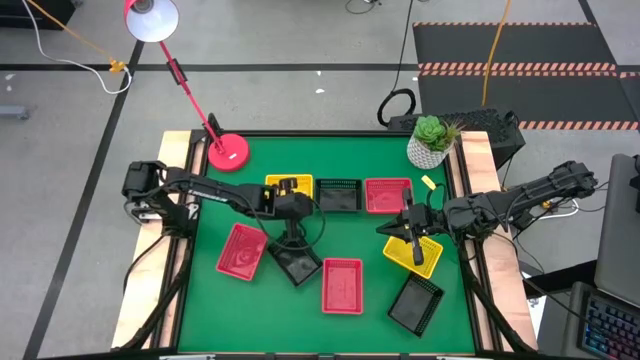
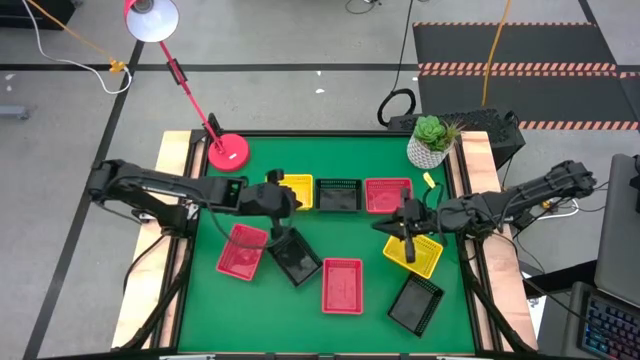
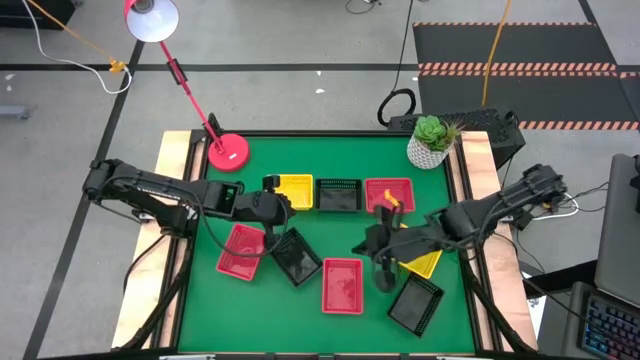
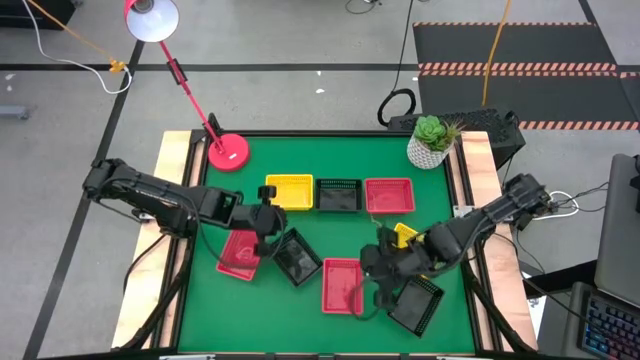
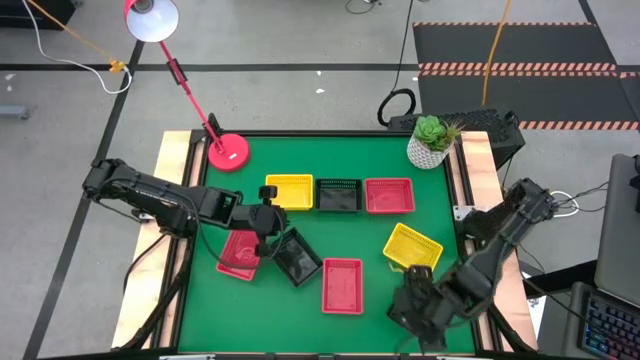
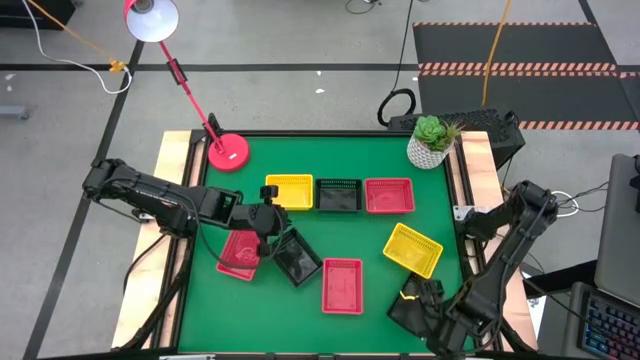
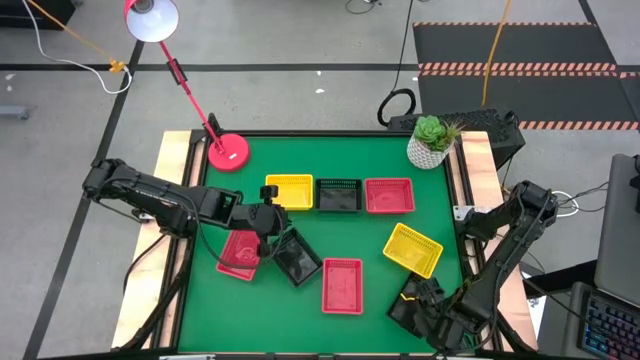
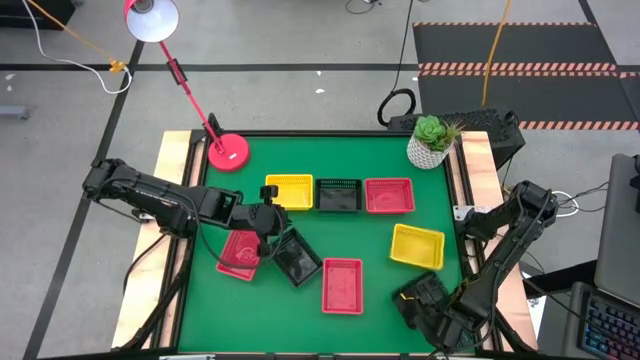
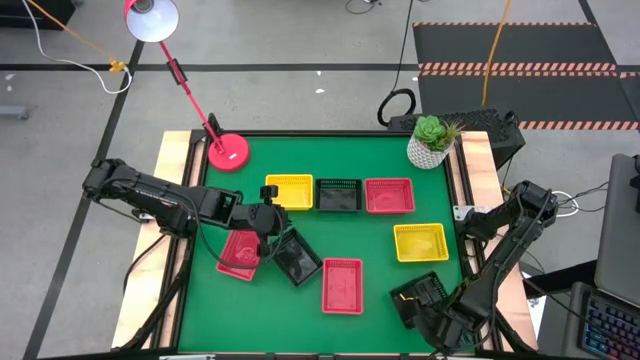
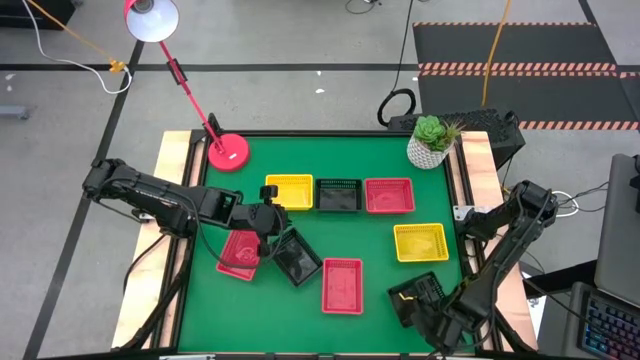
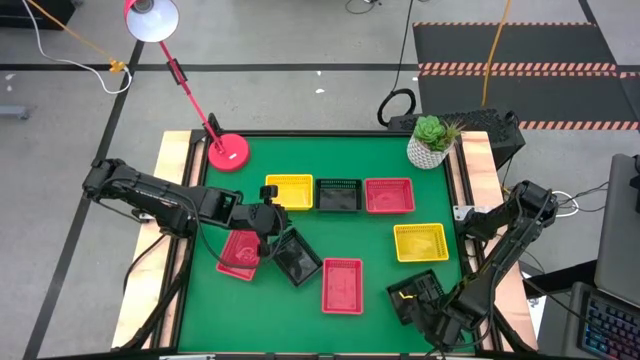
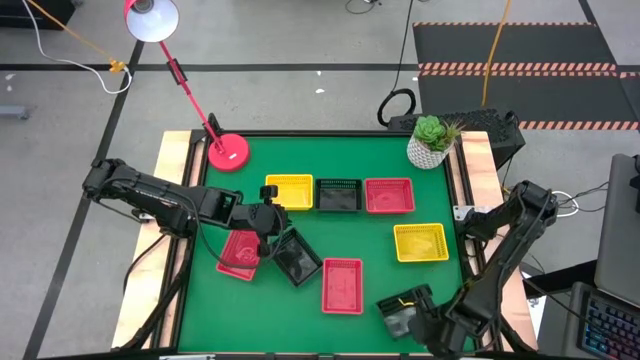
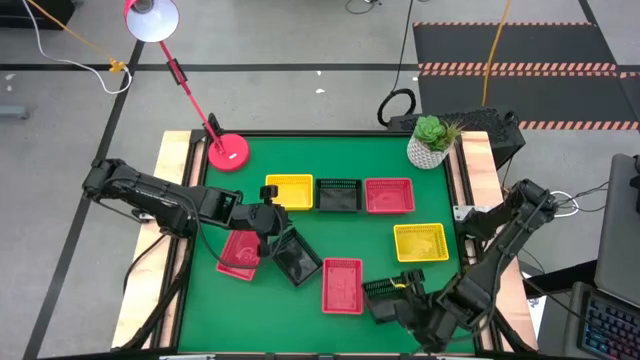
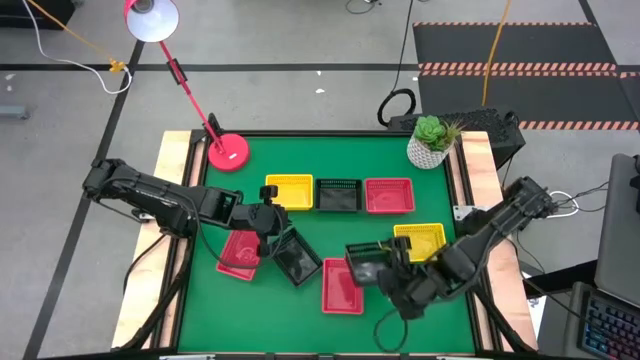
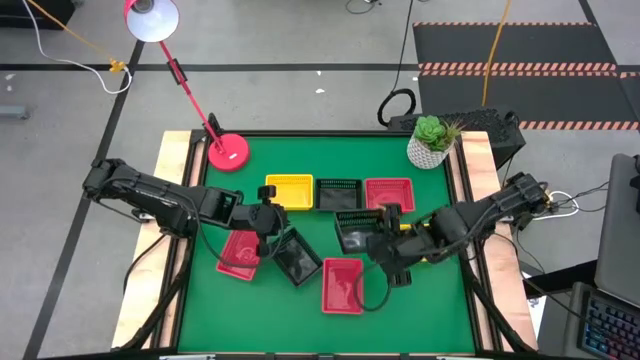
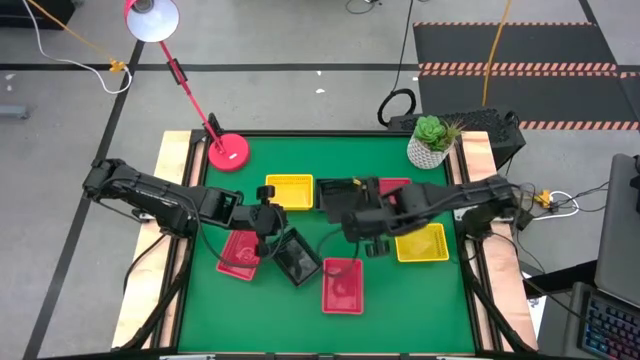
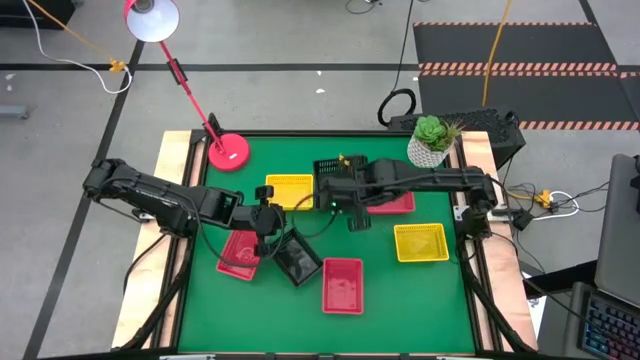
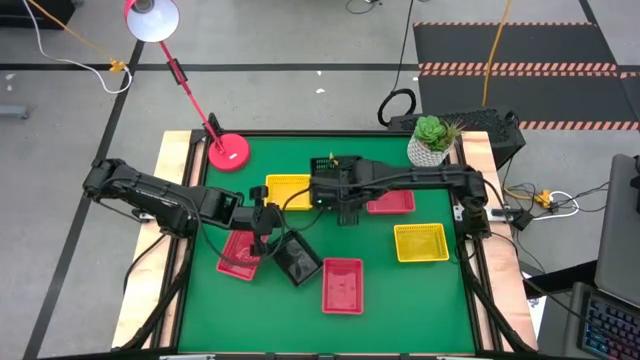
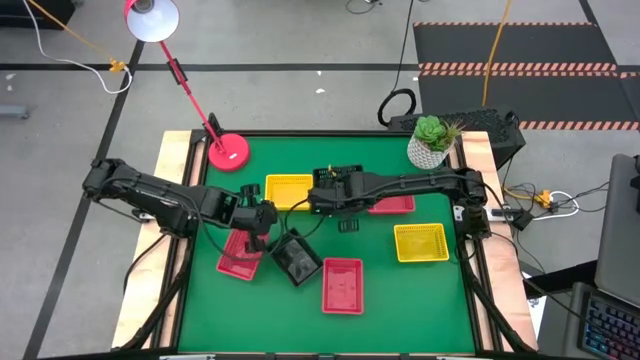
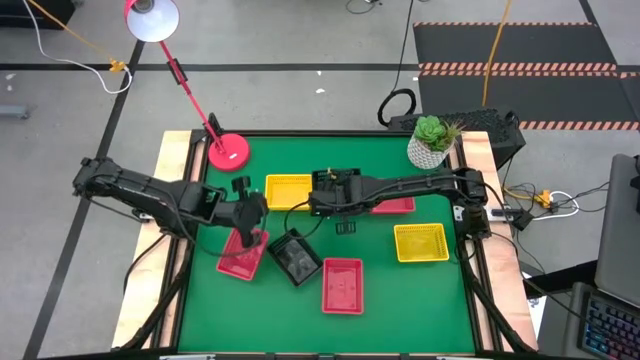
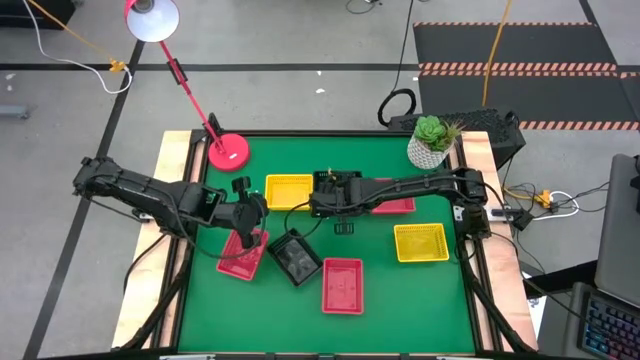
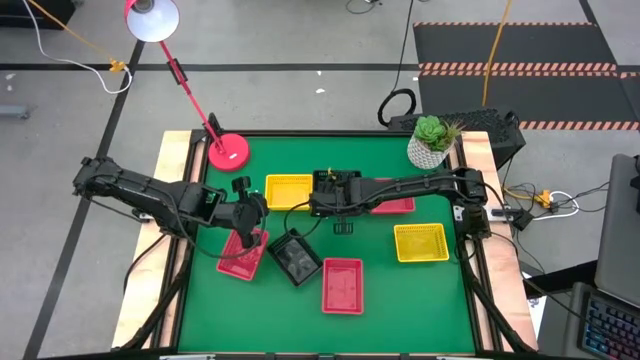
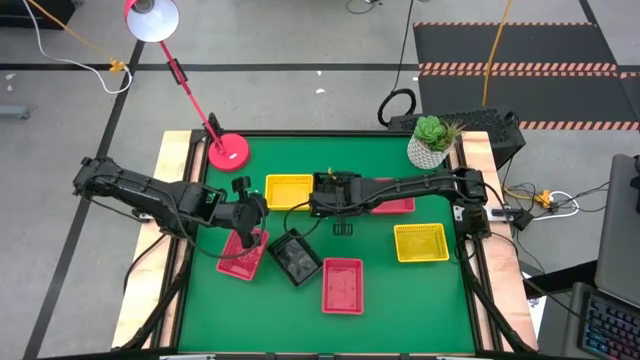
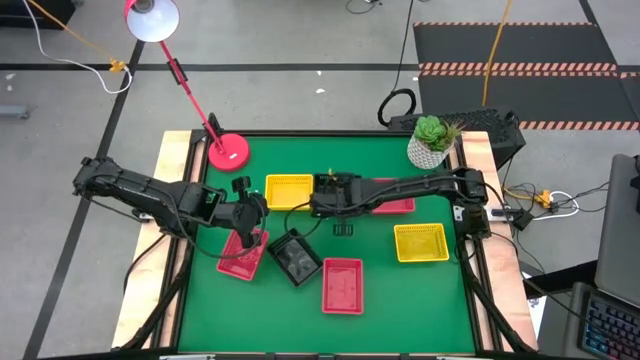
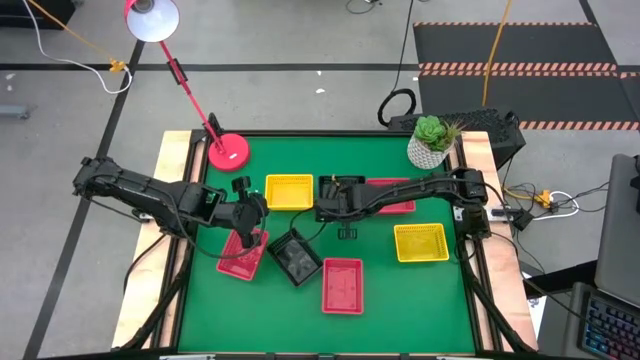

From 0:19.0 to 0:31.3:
Stack the bottom right black bin on top of the top black bin

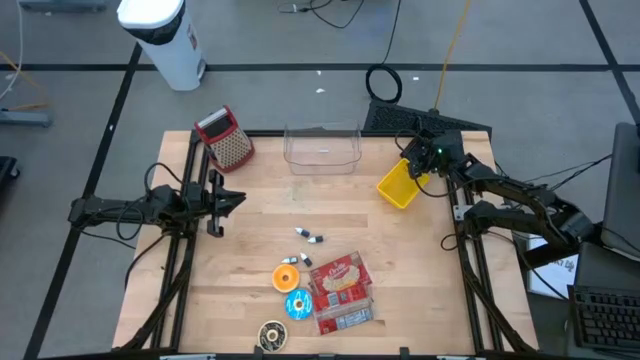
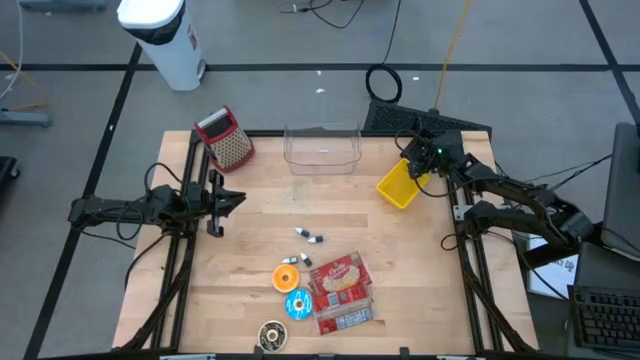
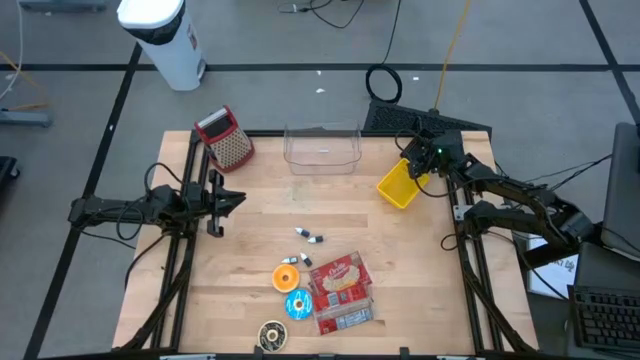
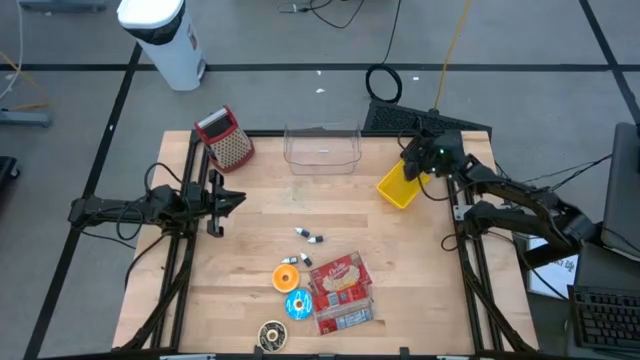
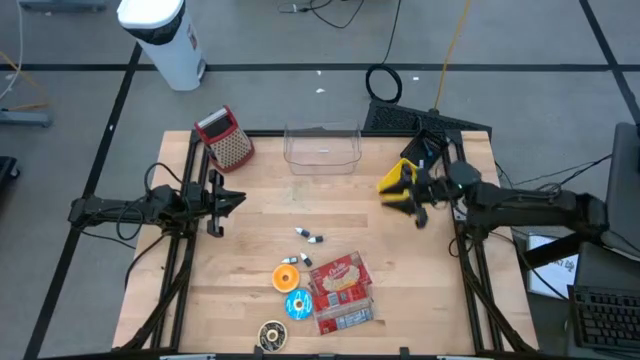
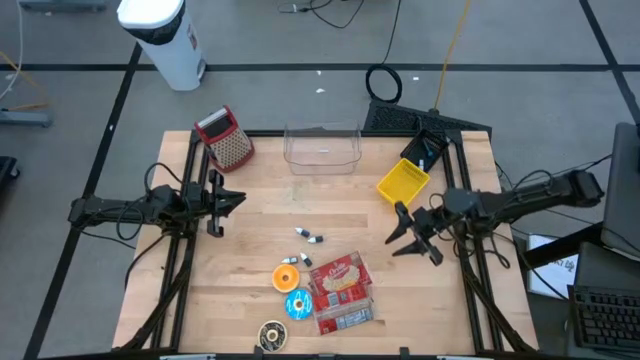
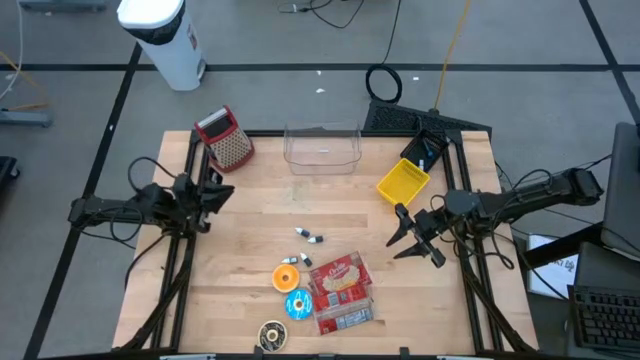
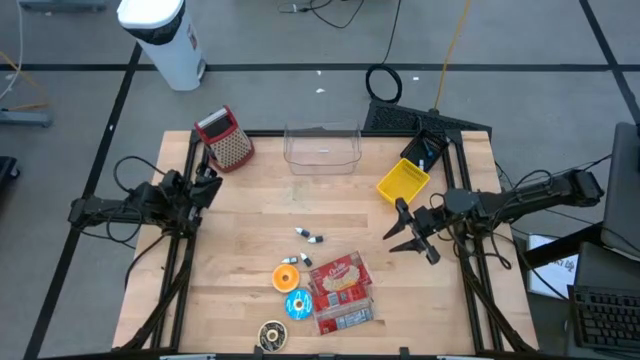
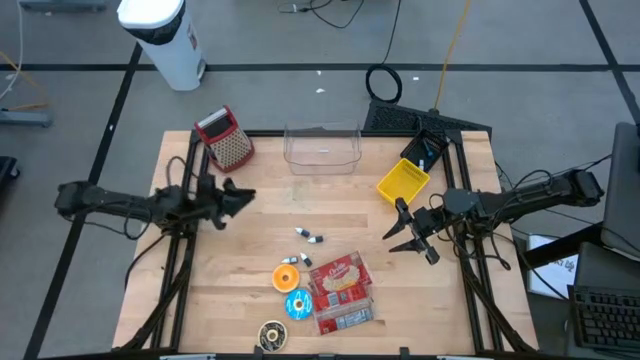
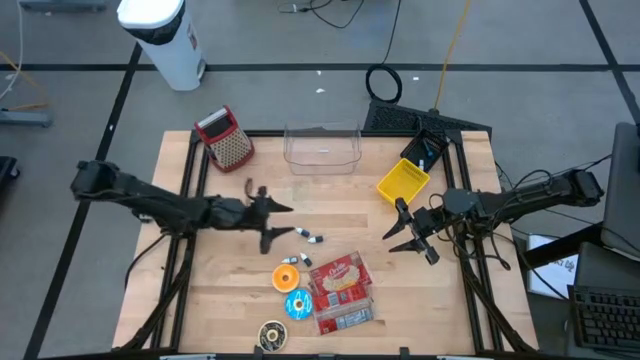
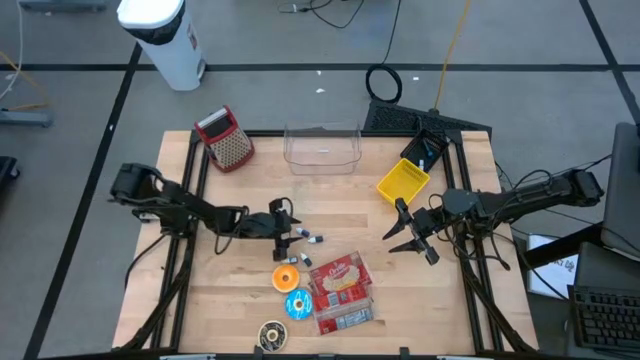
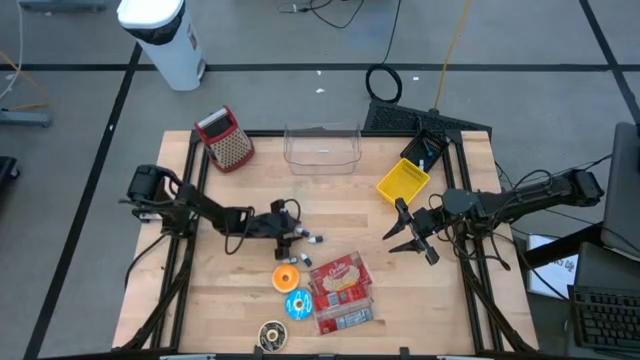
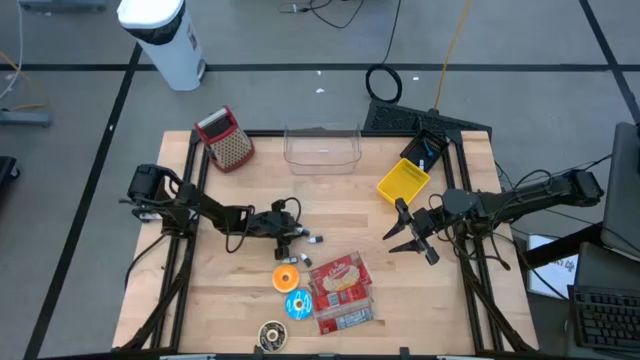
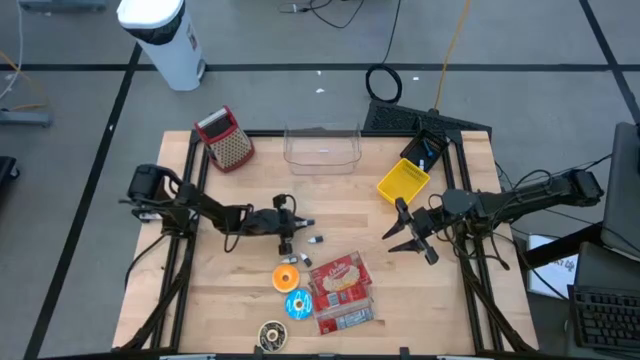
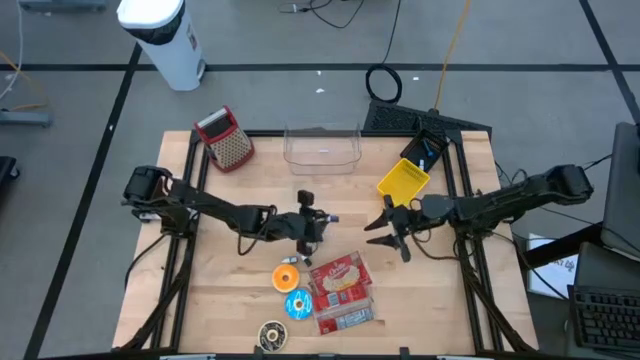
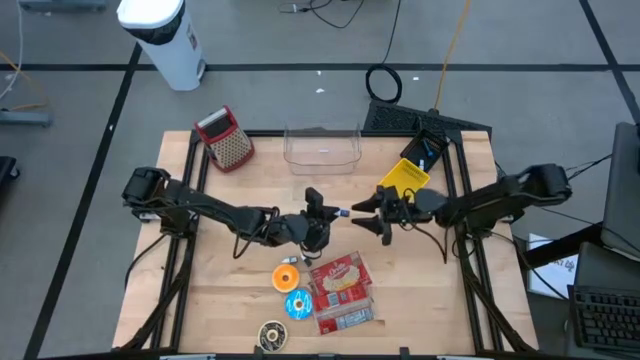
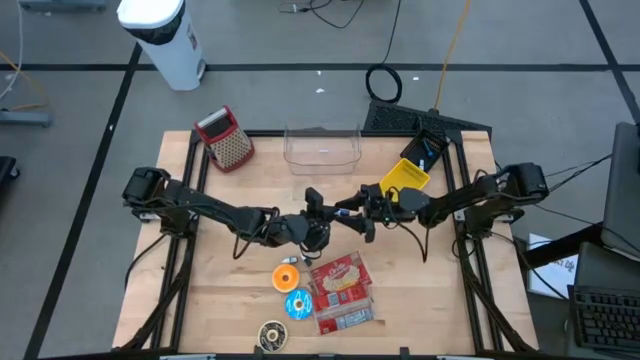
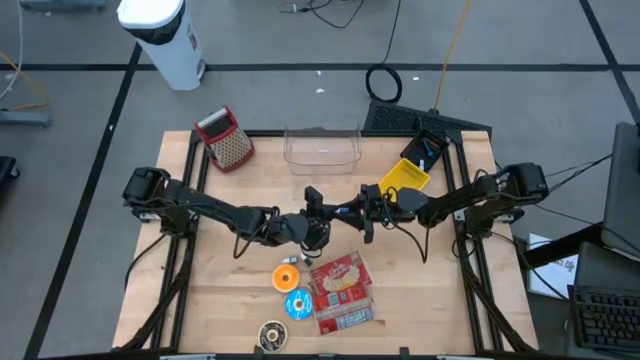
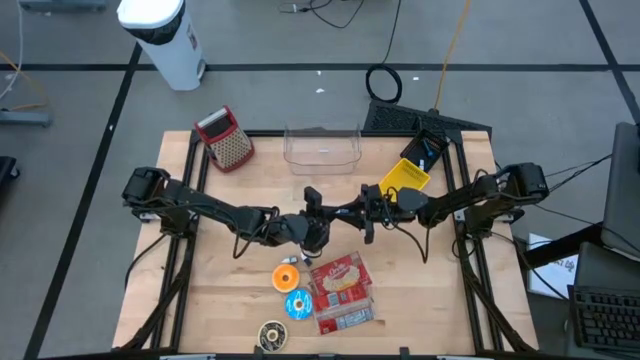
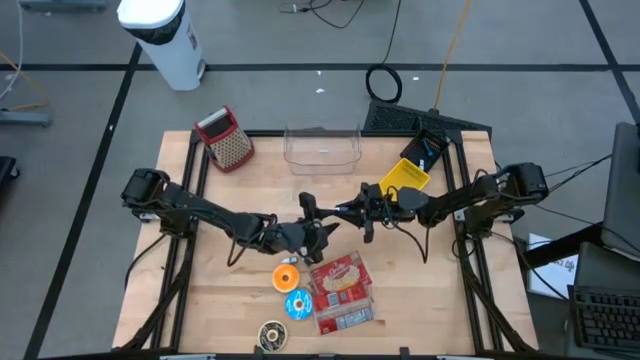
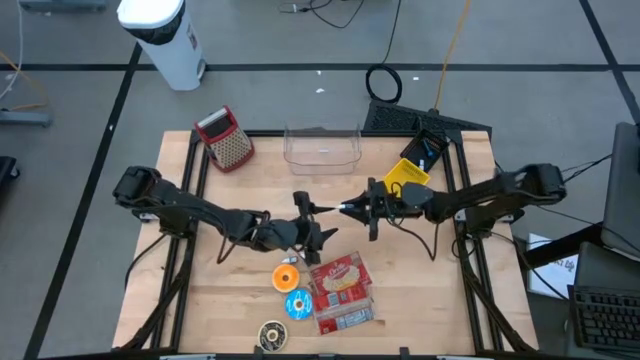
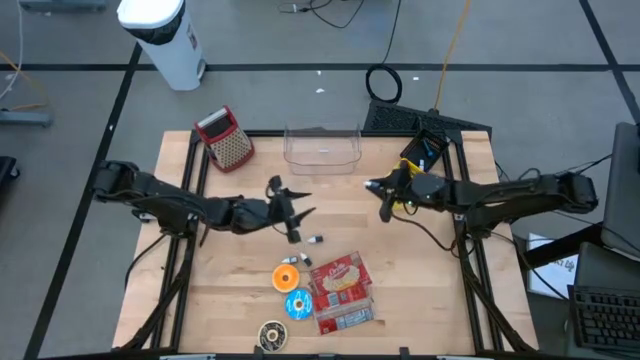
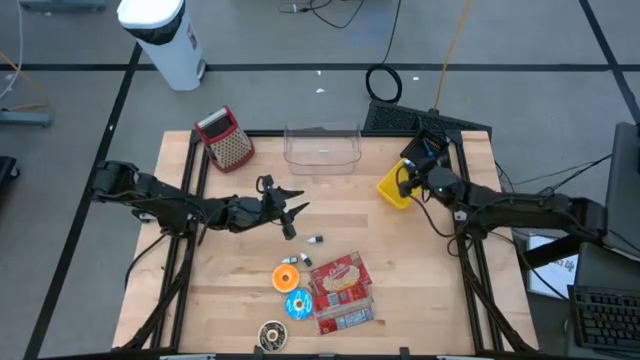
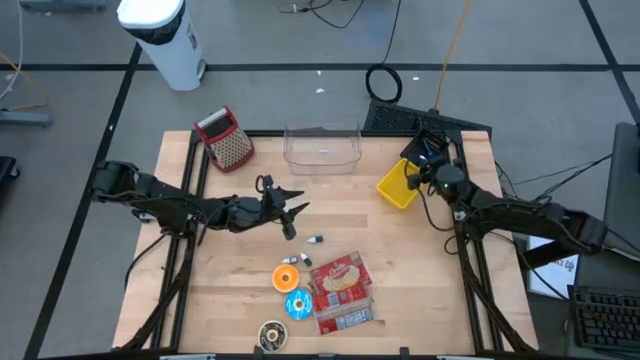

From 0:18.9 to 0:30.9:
Put the blue food coloring bottle into the black bin
